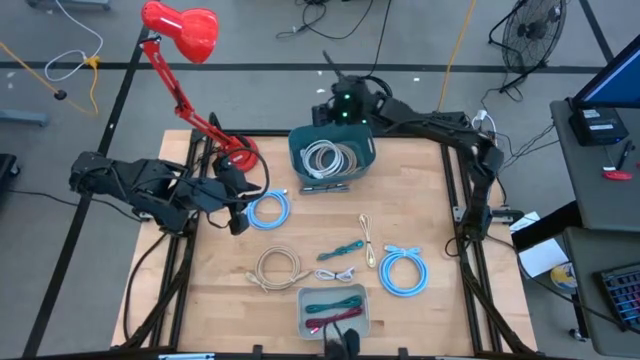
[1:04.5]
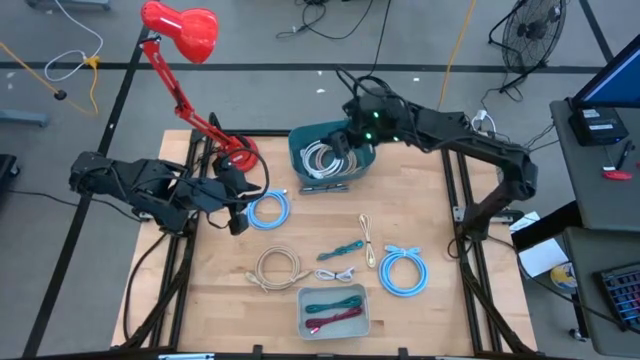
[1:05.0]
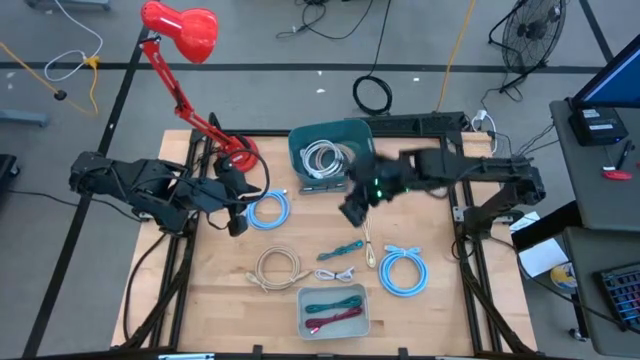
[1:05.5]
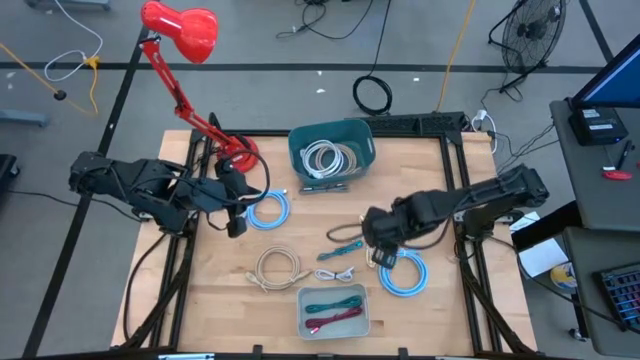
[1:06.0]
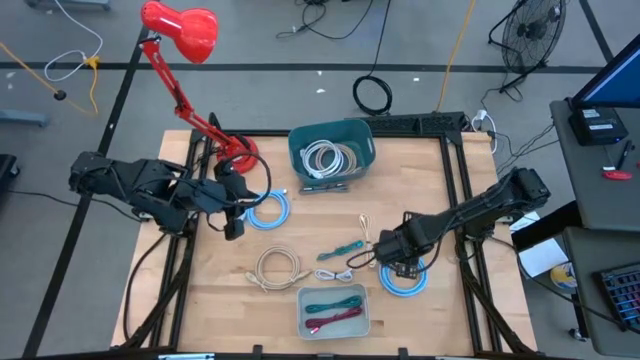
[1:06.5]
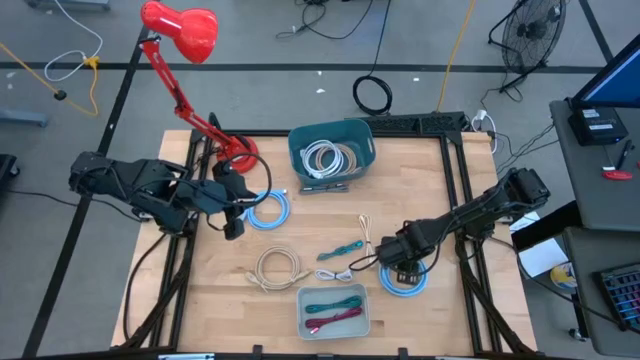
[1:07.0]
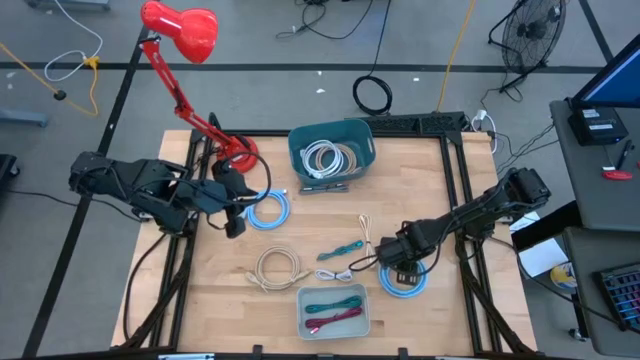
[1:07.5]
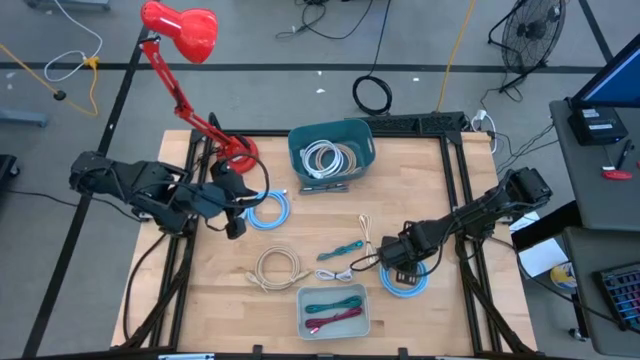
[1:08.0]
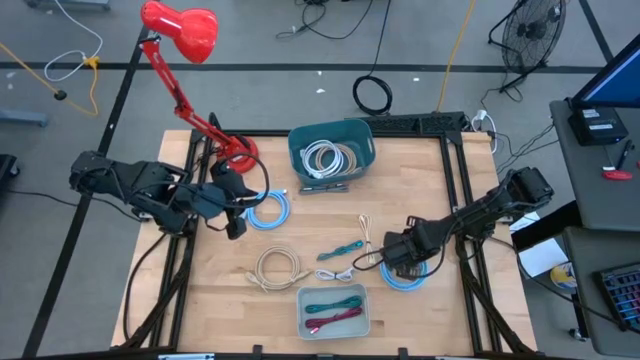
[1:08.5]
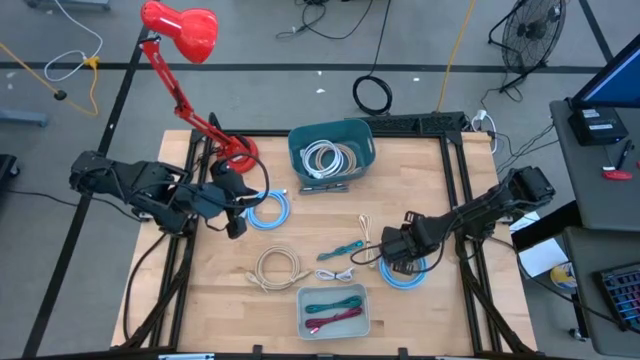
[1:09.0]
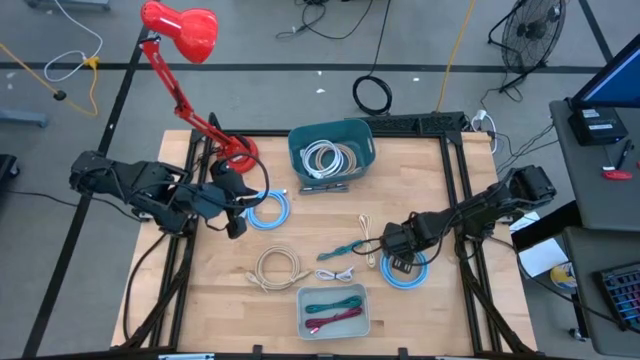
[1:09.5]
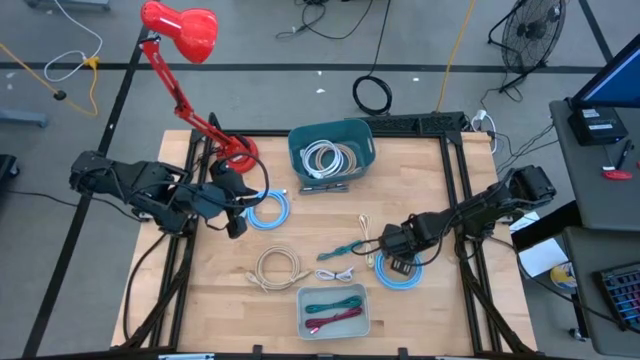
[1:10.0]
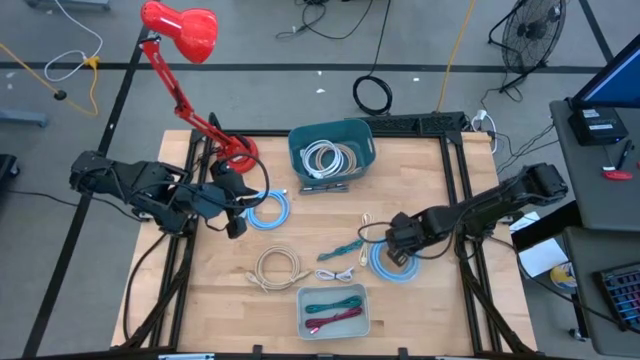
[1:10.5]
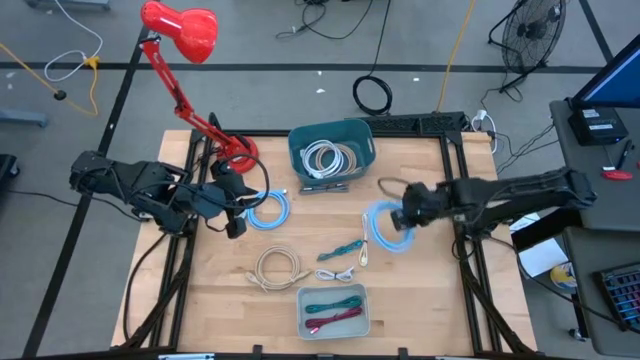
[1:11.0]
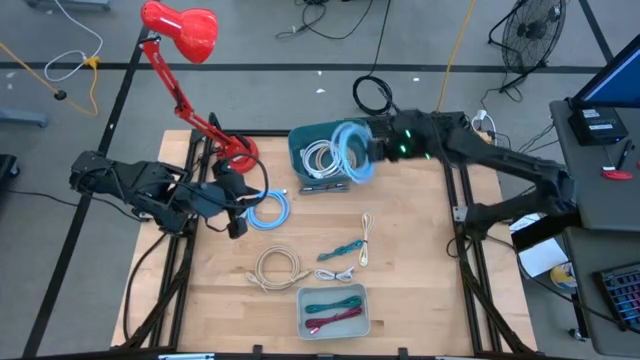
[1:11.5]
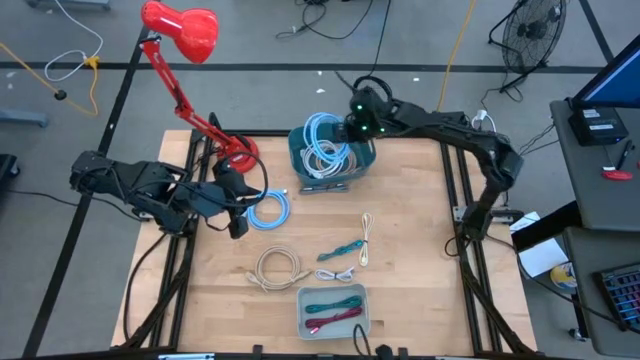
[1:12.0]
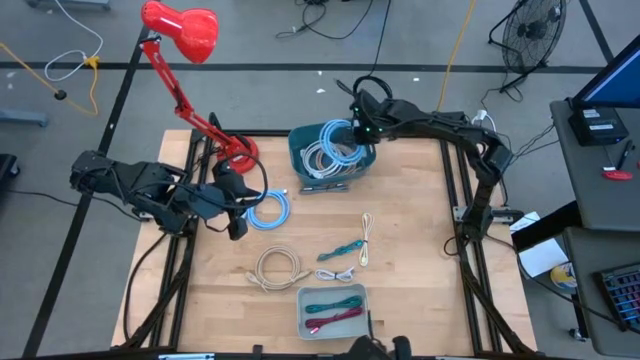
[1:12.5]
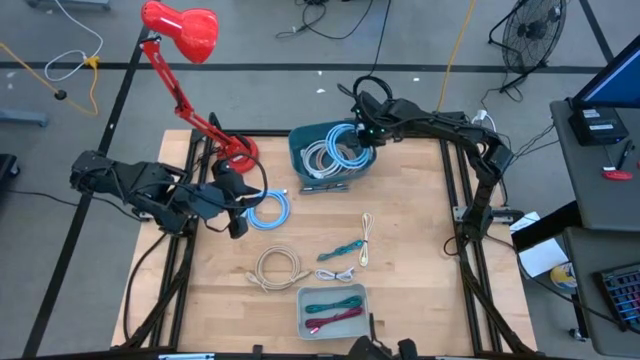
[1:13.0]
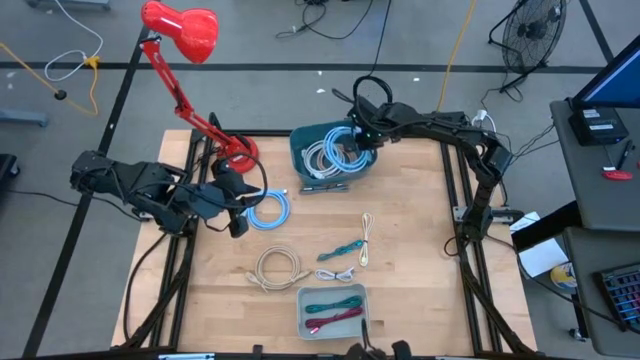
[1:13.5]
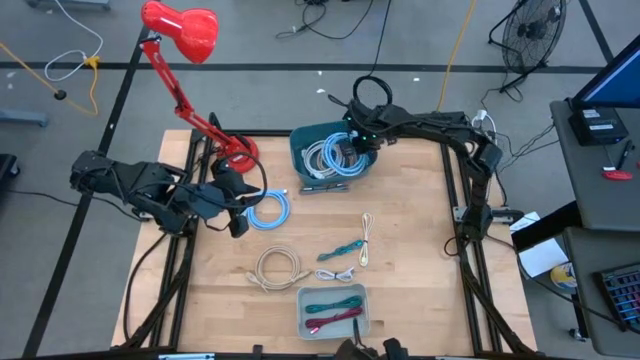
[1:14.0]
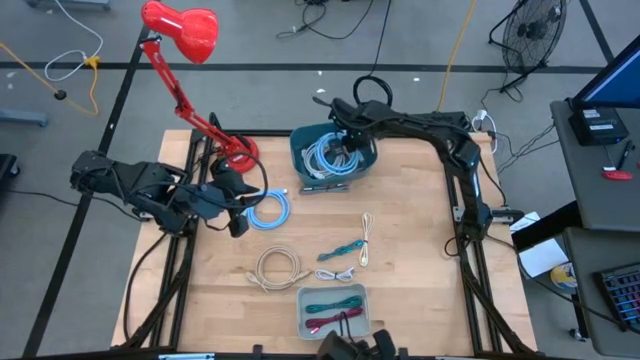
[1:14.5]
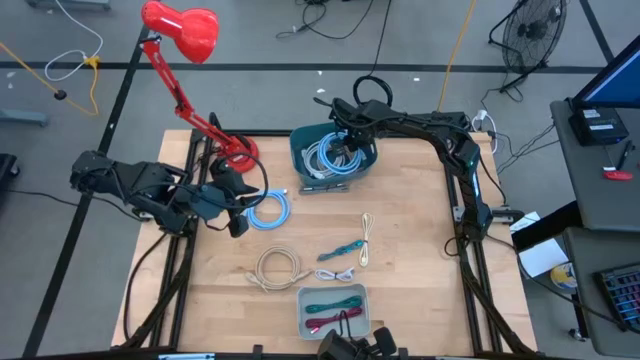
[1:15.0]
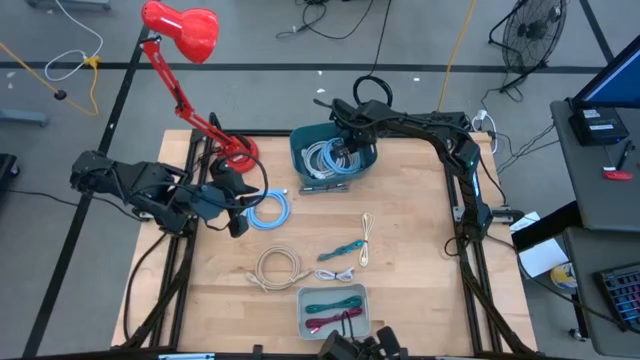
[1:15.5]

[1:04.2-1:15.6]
Task: Pick & Place USB Port
Put the right blue hdmi cable into the green bin

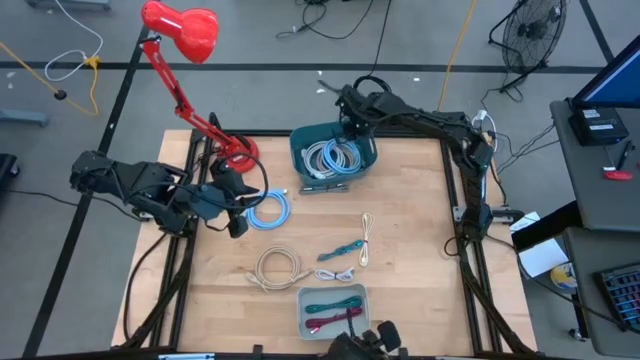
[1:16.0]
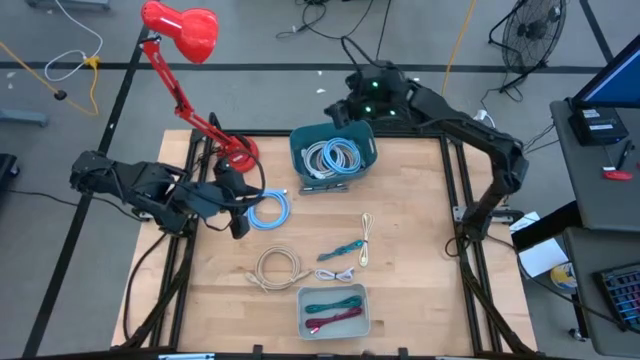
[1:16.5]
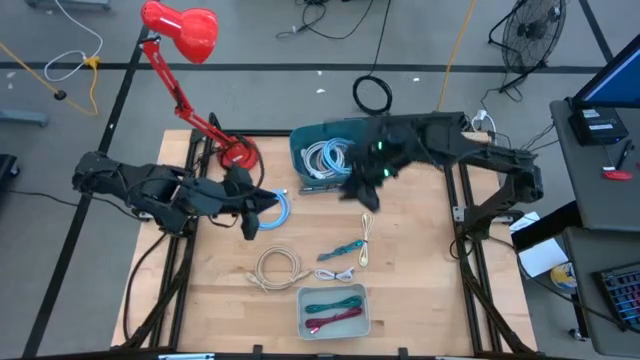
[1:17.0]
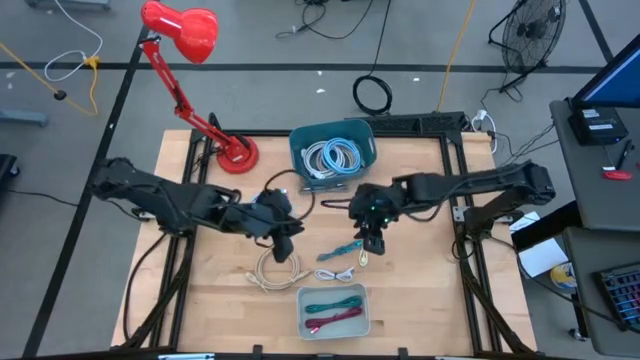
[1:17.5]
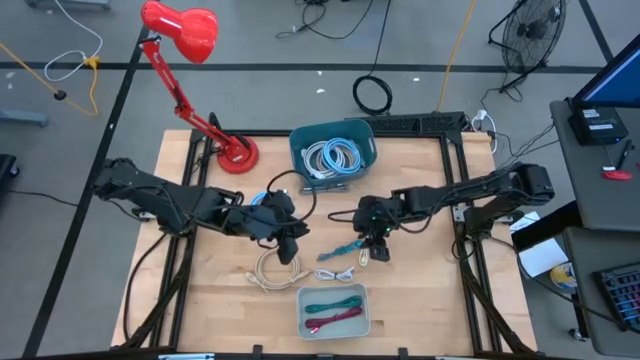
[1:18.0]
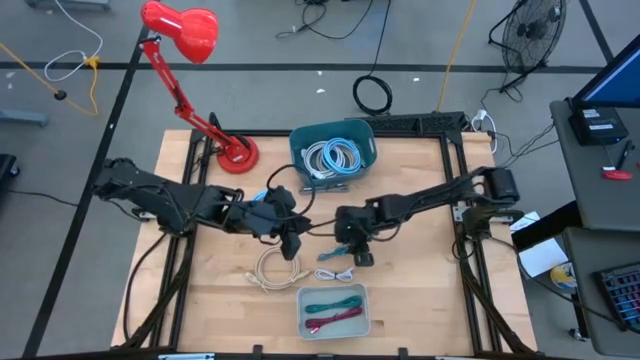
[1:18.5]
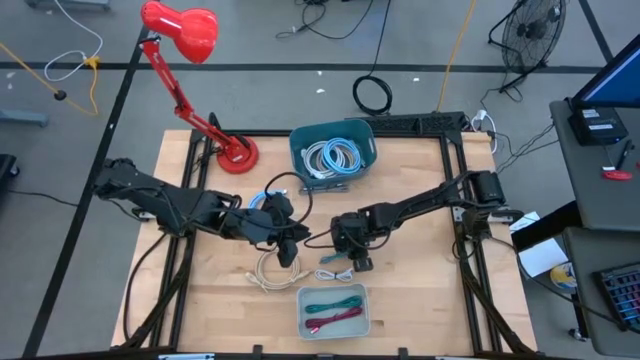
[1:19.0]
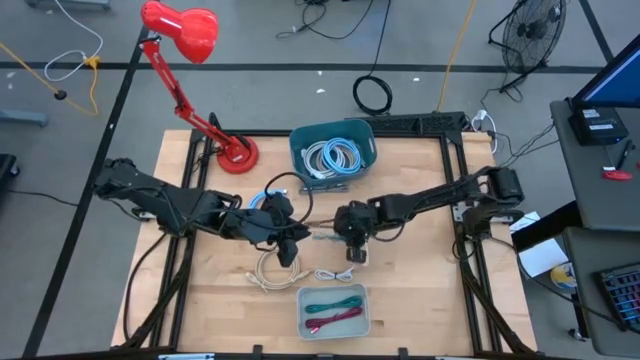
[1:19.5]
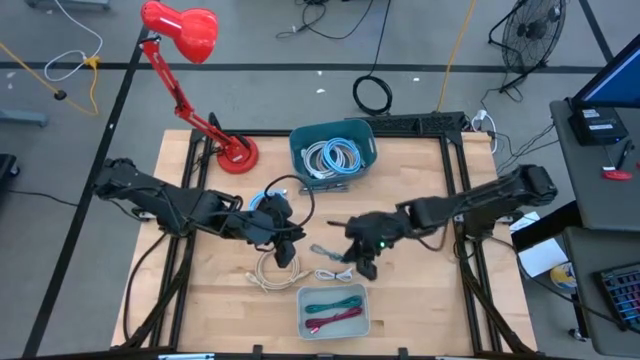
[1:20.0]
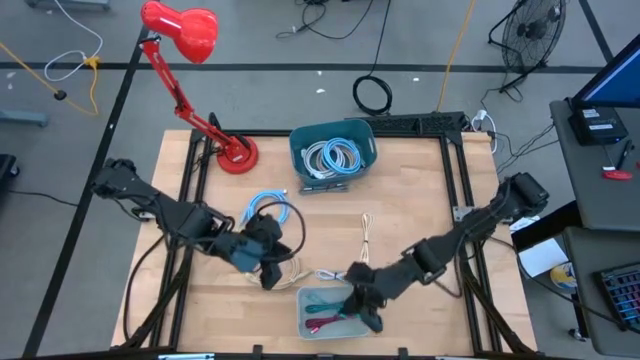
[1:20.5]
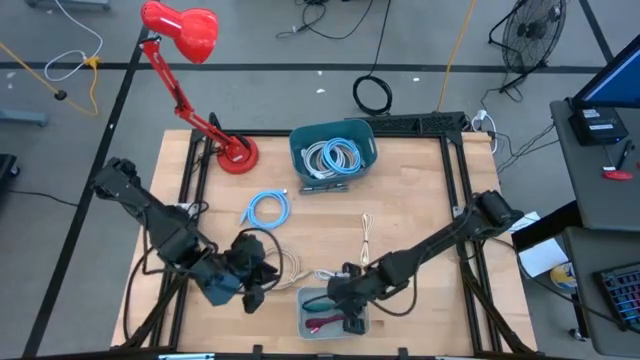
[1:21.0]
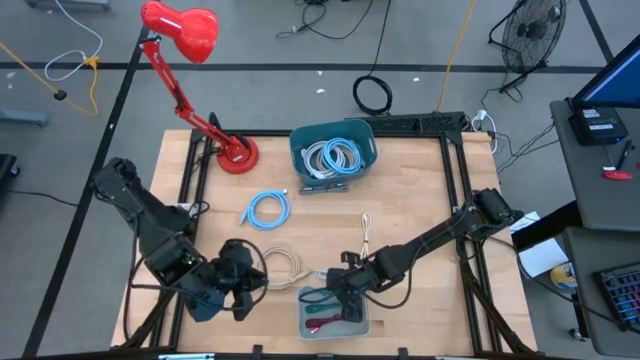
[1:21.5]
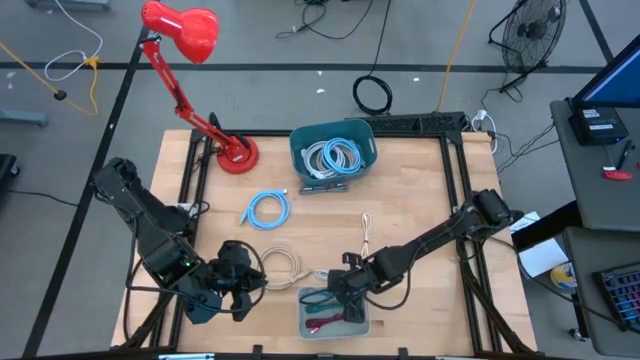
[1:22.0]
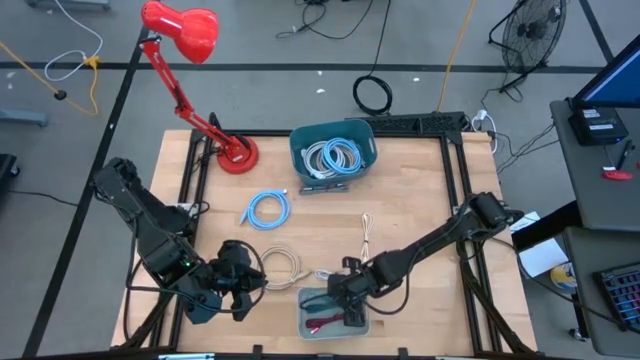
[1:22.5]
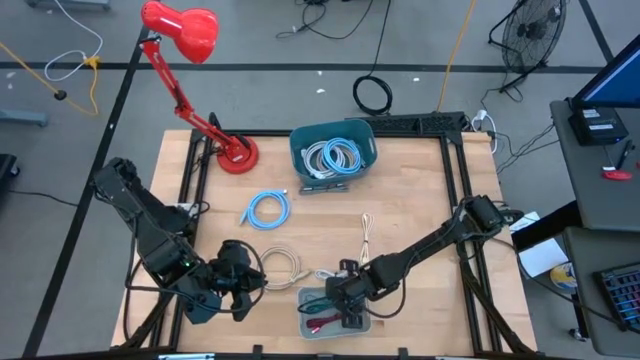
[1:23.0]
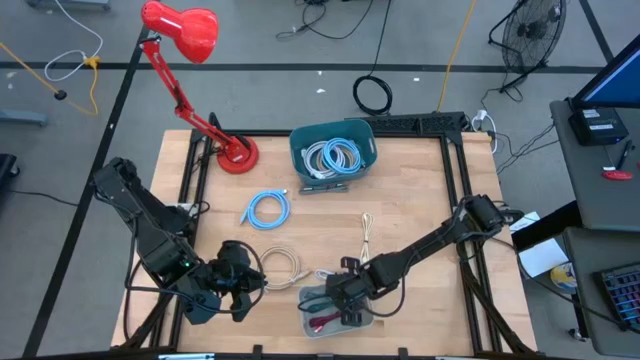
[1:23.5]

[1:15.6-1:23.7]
Put the blue charger cable into the gray bin

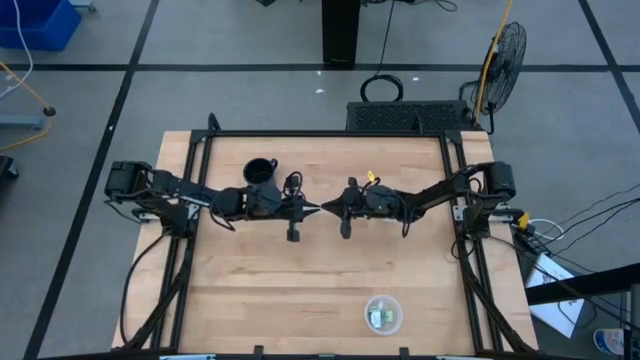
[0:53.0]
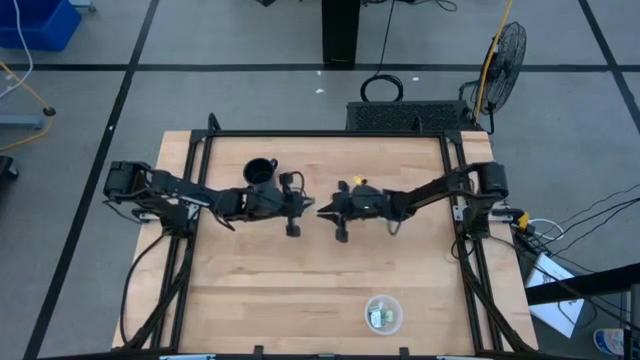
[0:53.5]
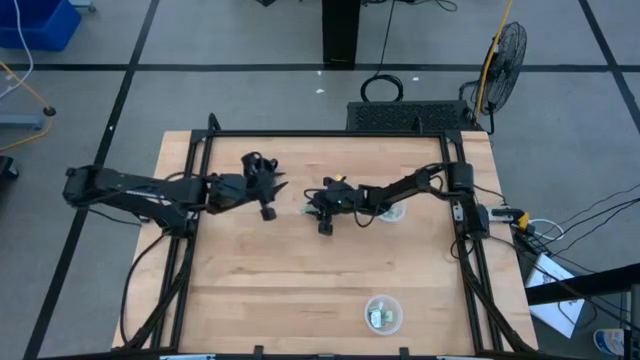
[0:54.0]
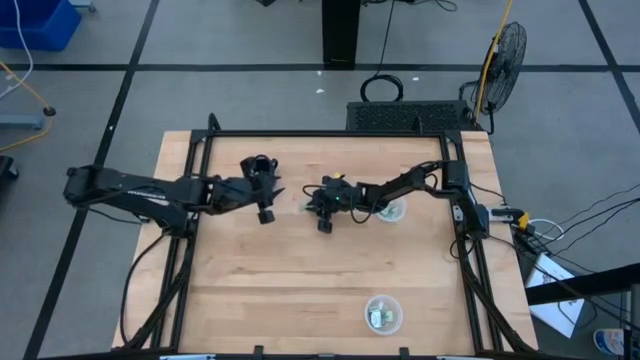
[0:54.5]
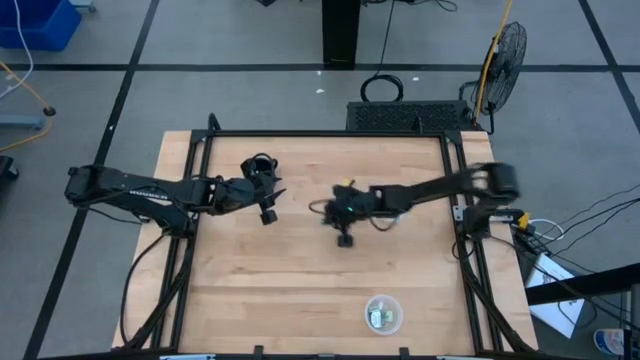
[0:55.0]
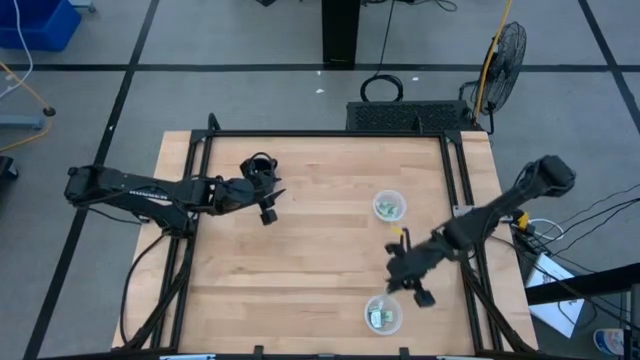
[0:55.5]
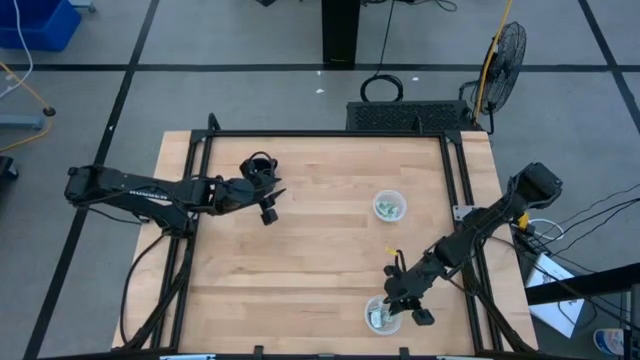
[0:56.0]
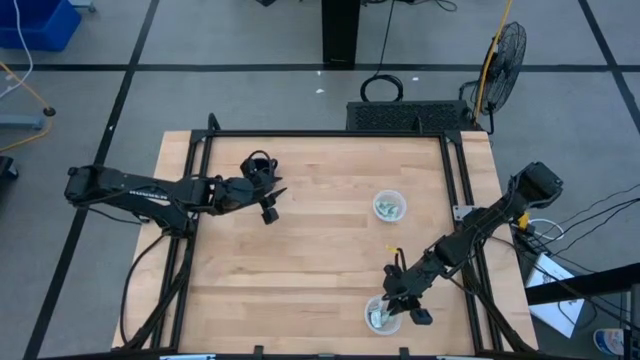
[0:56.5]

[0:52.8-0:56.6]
Task: Pick and place Stevia / Truvia into bins
Put the light green stevia packet into the bottom transparent container
